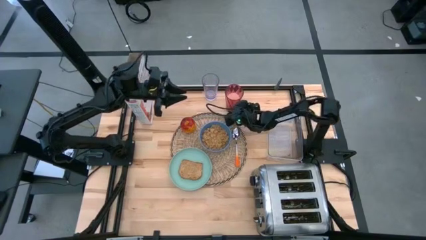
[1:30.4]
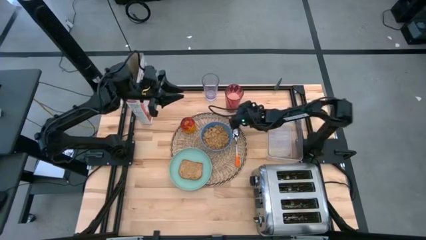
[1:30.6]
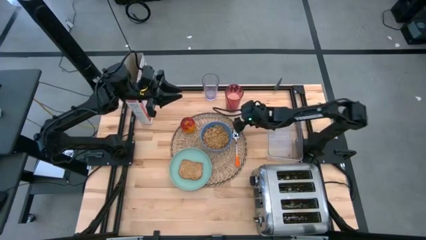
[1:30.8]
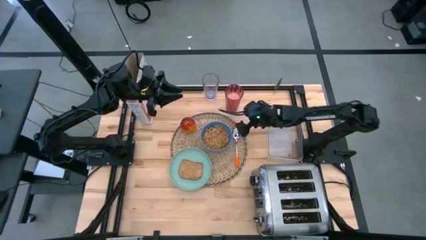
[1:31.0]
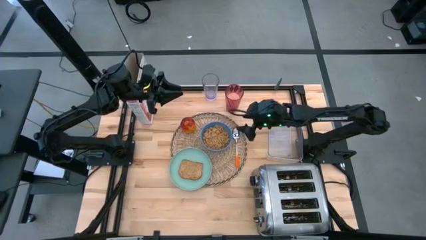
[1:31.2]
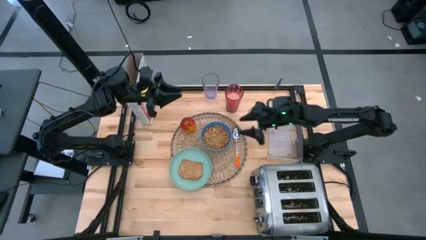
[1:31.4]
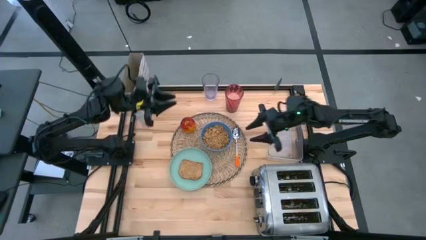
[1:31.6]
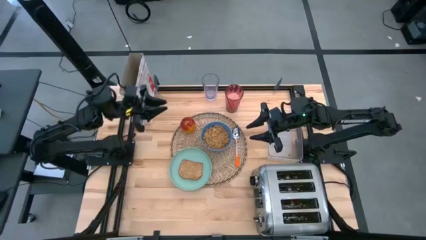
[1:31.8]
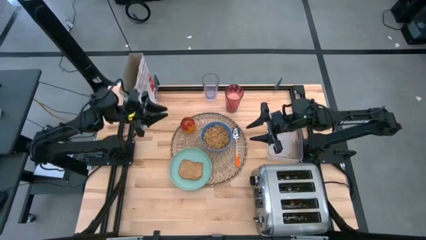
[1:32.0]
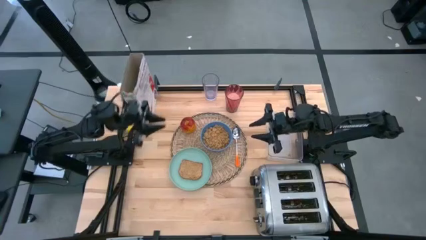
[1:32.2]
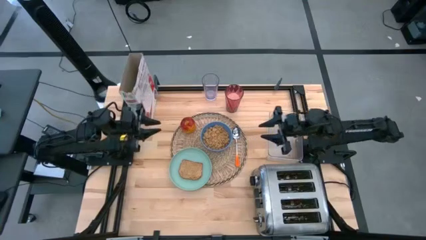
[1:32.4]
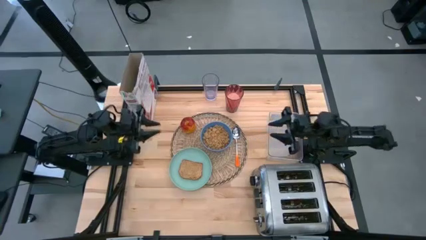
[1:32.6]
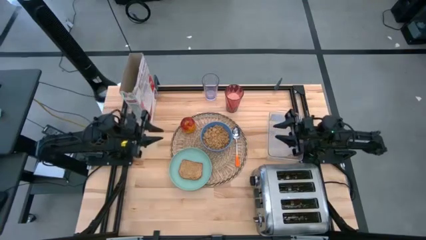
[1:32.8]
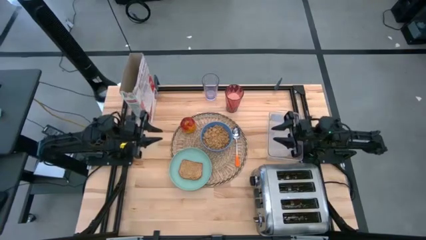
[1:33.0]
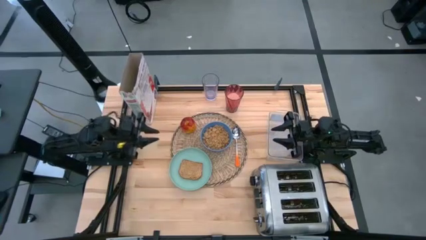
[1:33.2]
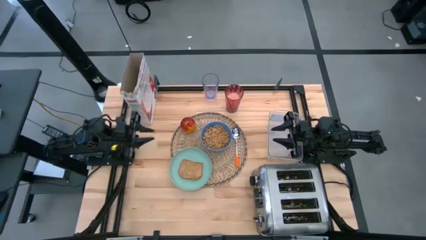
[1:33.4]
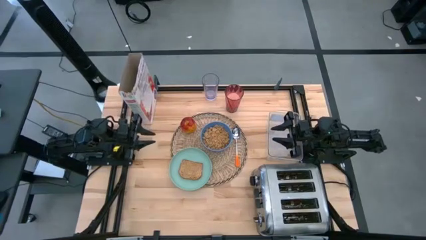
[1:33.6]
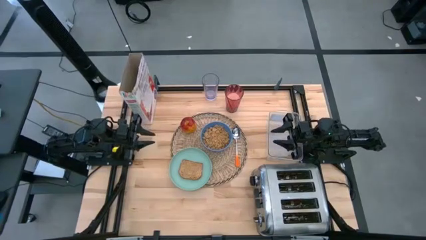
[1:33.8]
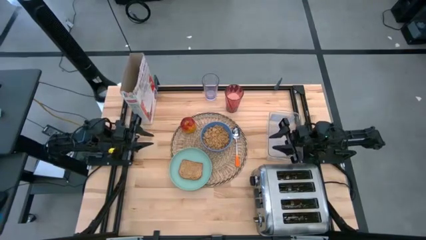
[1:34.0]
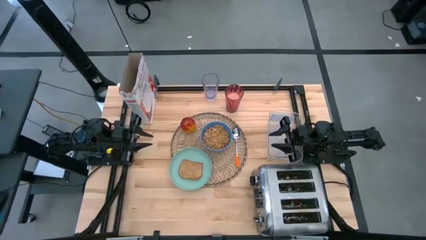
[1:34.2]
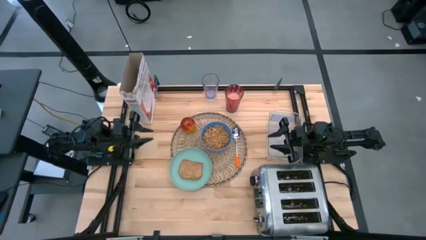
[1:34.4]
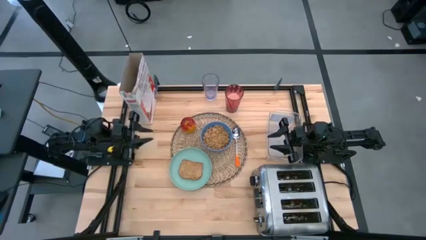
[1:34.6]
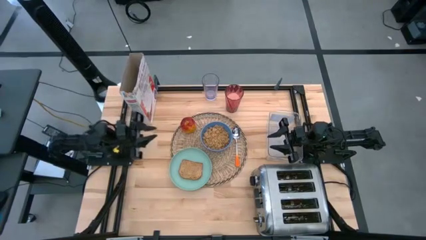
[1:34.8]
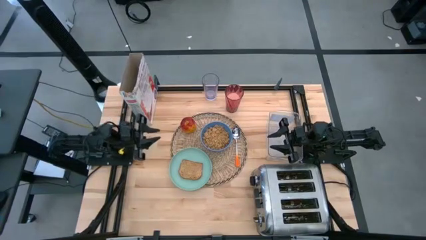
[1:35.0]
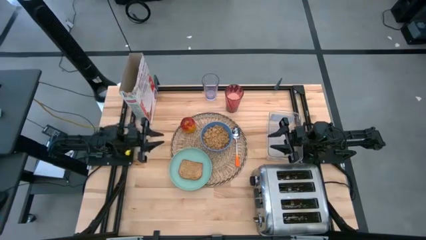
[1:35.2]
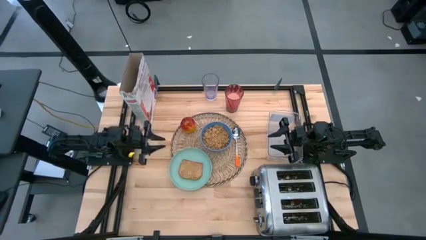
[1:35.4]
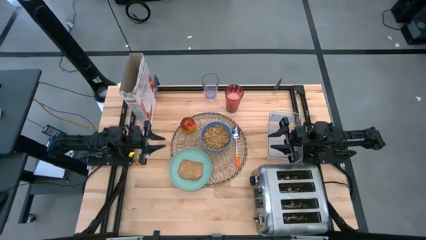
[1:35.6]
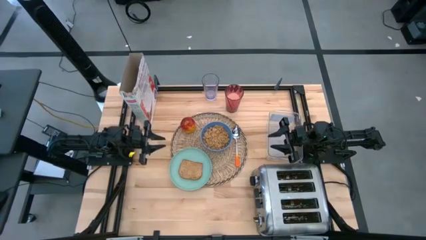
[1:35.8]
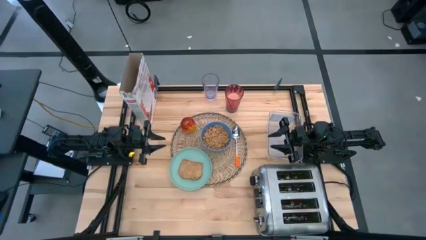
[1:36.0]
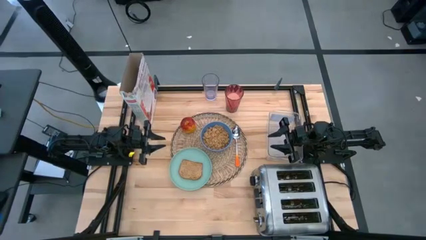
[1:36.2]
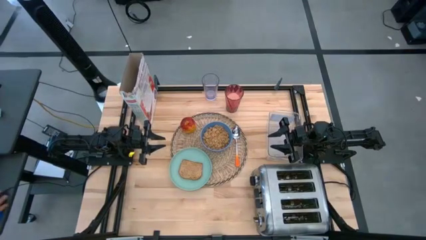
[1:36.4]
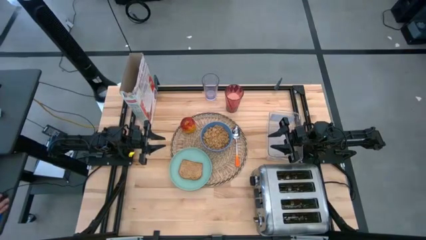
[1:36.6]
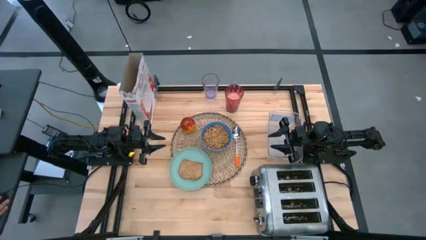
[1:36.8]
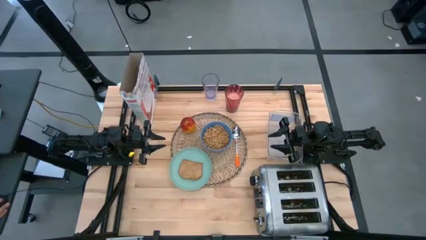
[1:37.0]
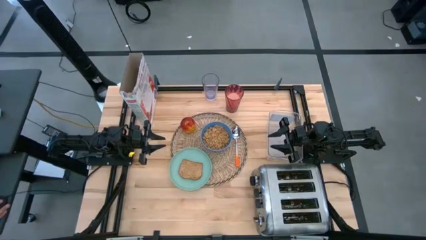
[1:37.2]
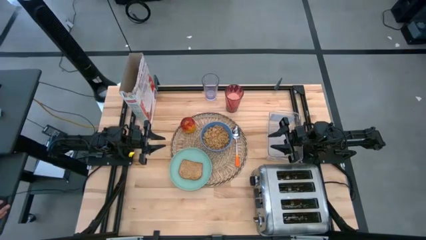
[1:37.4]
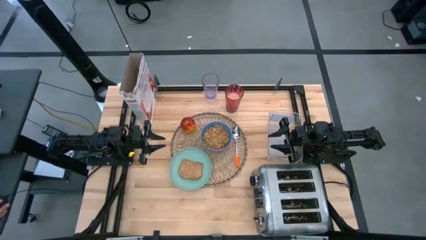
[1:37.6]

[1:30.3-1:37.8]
Task: Arrange a breakfast setting
Return to Home Position

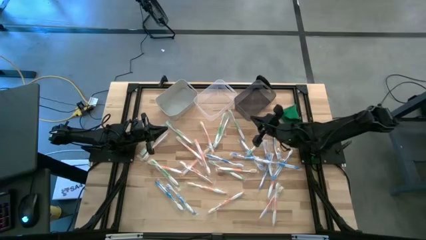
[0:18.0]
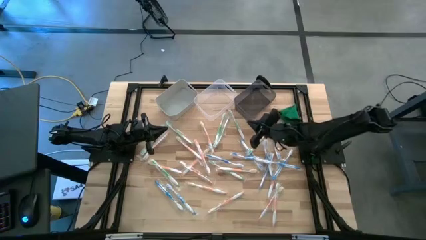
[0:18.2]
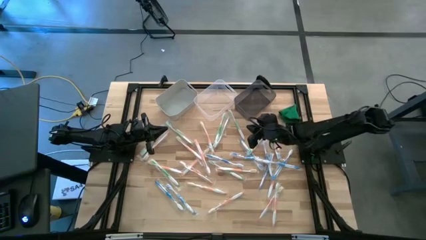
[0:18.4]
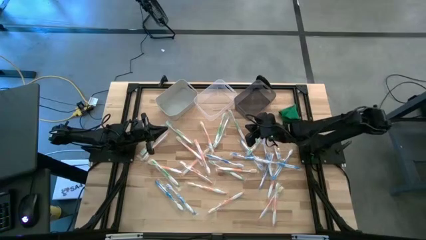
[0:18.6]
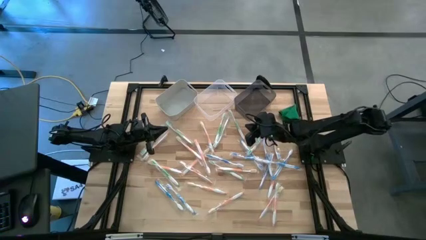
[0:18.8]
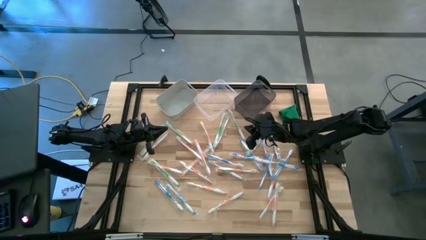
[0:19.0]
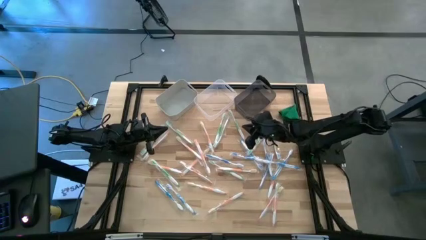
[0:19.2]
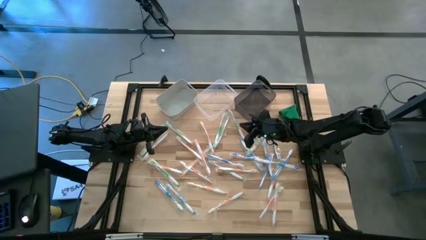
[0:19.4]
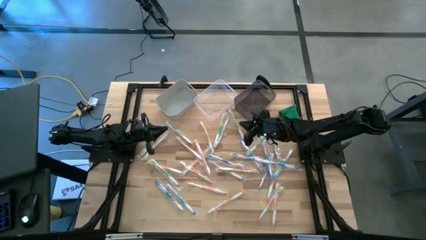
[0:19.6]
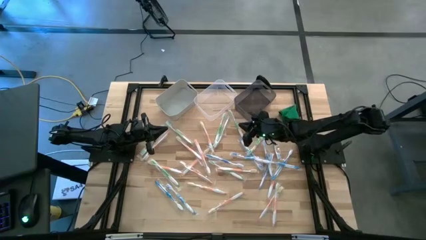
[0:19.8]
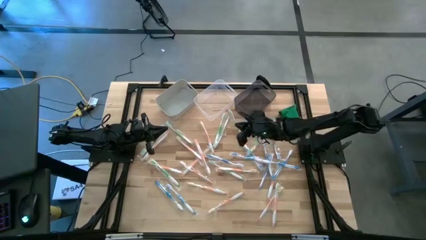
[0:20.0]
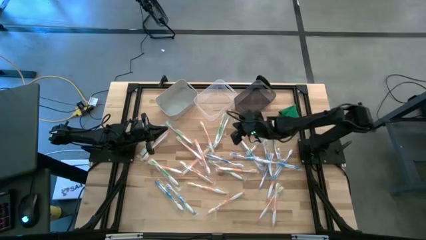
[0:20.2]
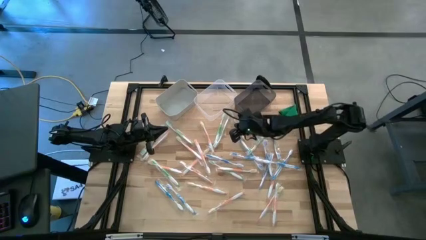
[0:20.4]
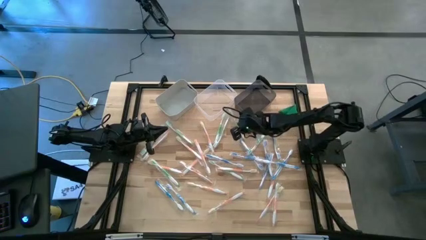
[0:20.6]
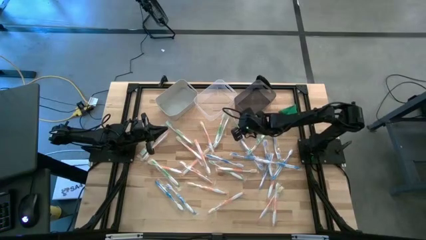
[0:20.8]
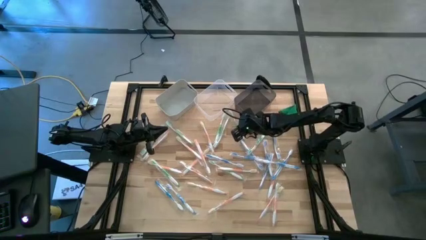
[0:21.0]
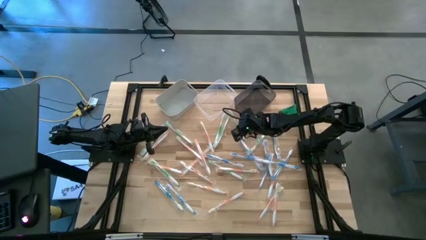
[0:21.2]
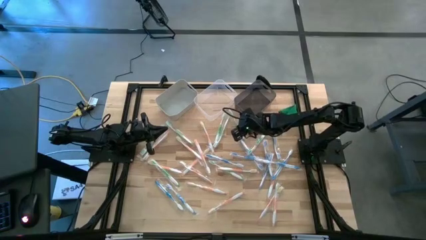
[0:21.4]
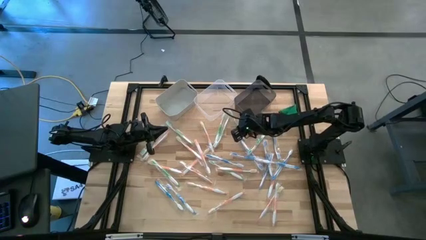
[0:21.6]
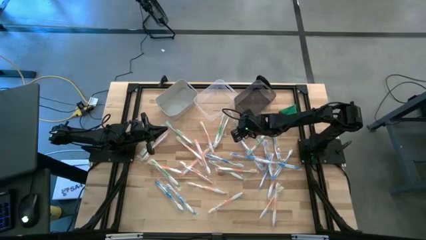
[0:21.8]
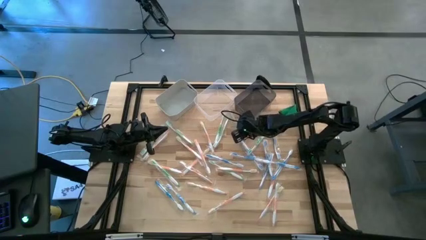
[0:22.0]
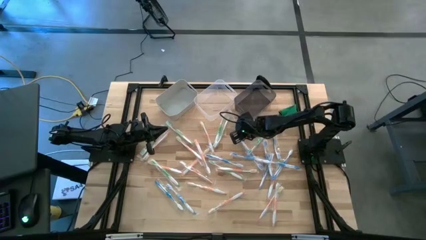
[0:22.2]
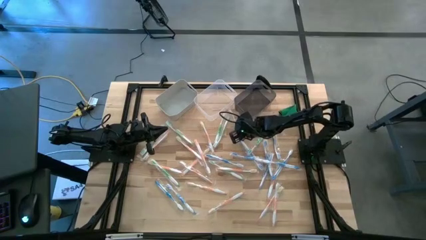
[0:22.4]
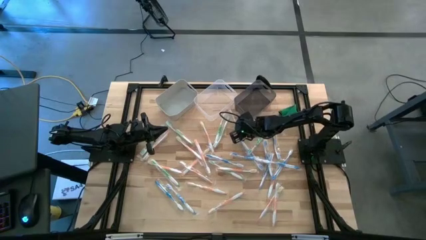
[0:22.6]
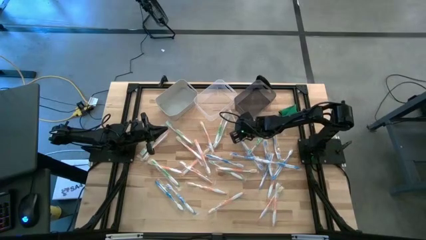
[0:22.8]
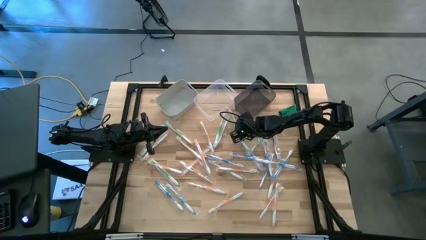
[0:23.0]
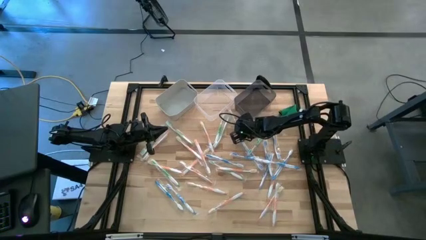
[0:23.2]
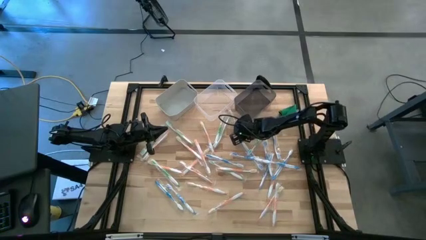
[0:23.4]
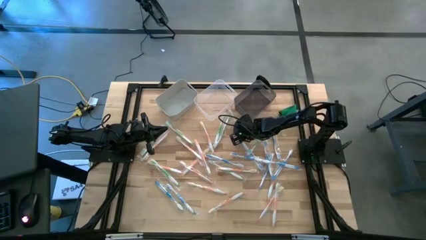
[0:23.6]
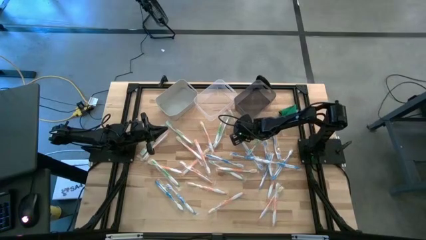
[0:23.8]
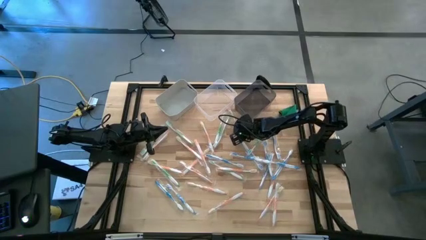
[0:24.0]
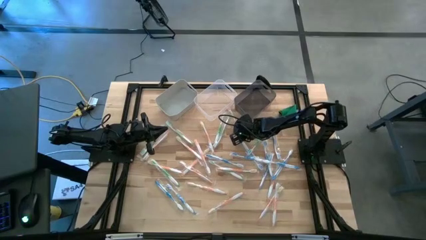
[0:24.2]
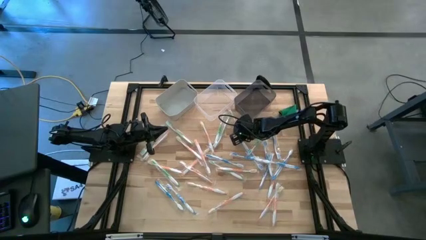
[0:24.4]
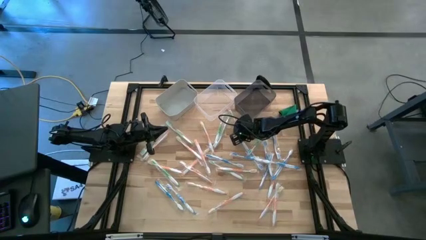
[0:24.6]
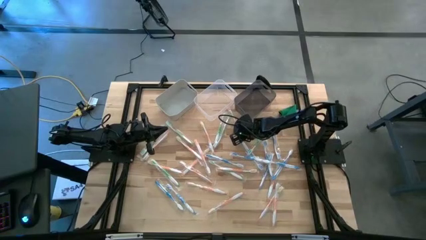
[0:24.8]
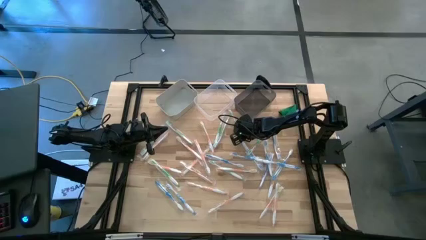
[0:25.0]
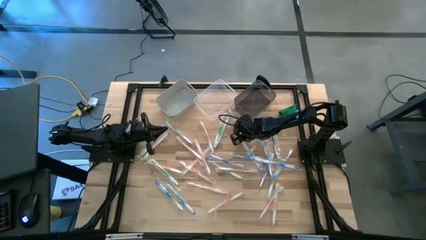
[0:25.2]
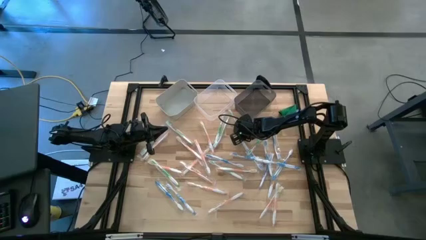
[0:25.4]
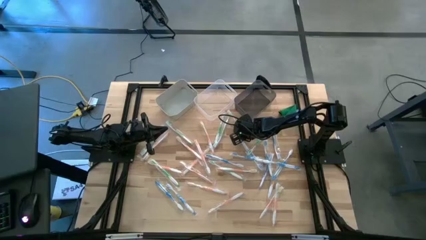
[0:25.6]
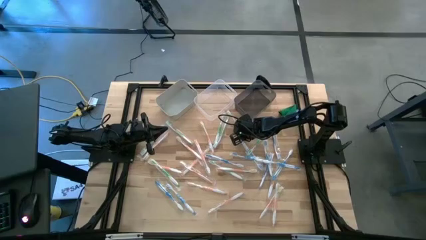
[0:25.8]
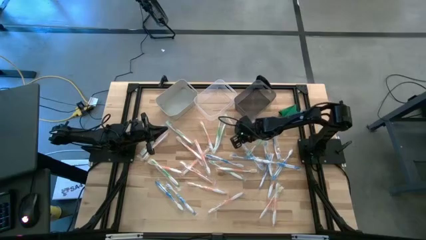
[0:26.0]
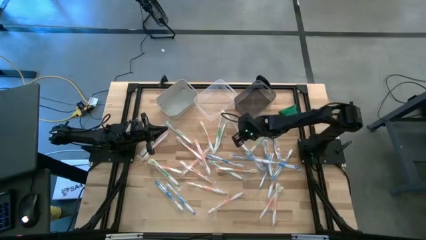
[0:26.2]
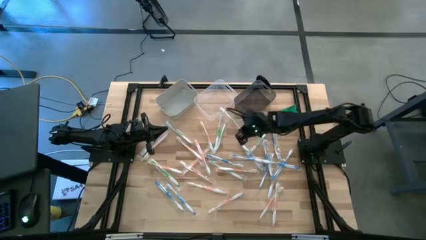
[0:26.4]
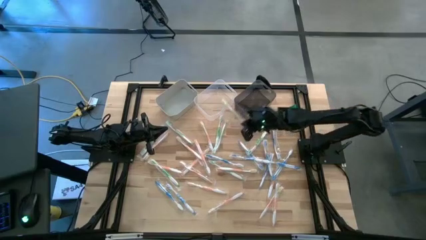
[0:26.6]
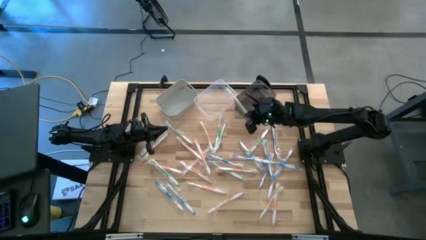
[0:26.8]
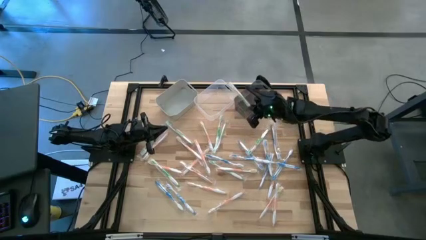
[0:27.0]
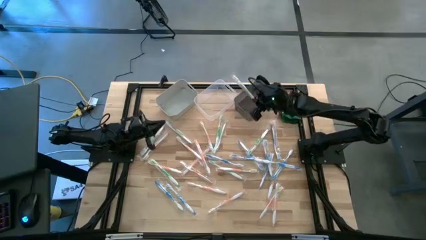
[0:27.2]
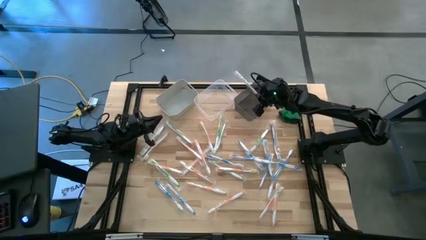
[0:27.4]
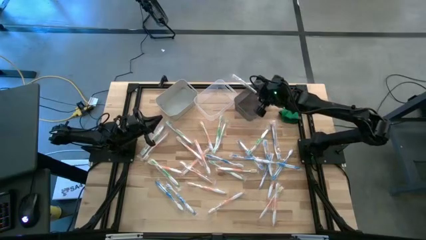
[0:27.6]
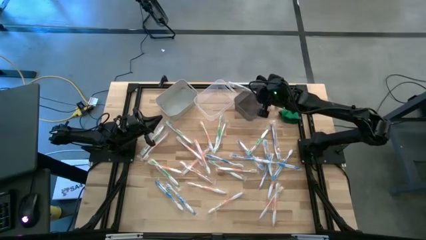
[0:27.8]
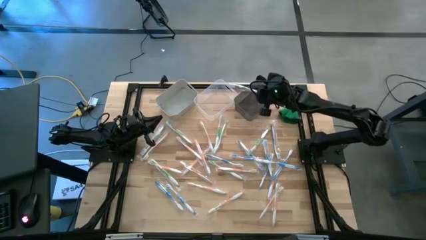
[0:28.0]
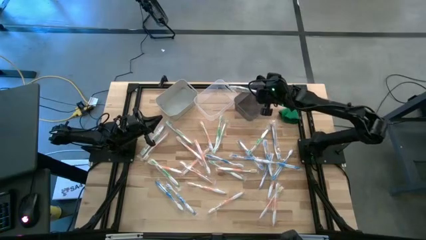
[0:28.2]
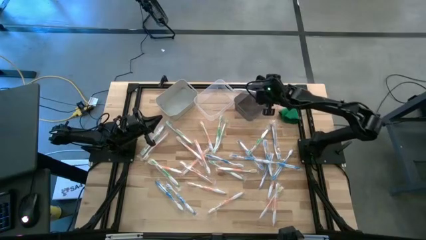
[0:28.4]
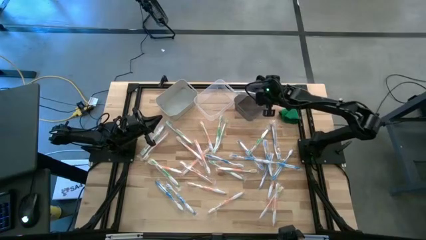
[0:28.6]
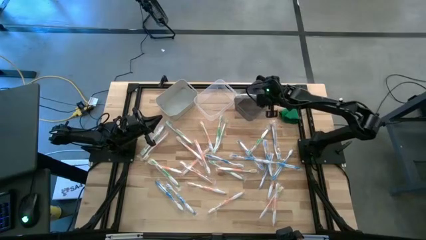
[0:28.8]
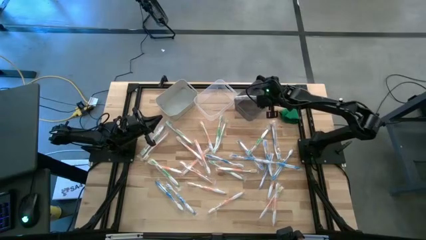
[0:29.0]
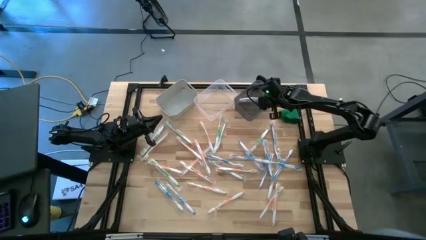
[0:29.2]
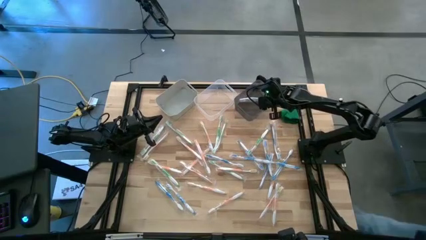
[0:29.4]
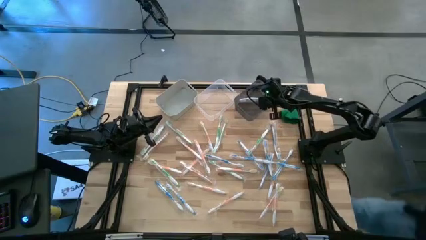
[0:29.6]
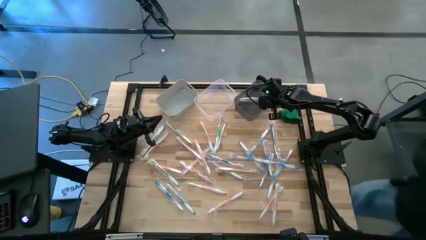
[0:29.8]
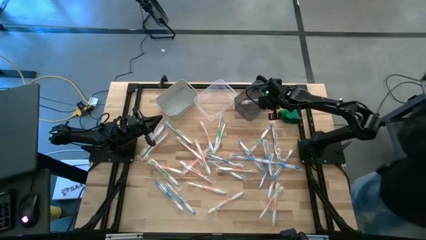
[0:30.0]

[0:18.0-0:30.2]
Task: Pick & Place Toothbrushes
Put the green toothbrush into the black bin
